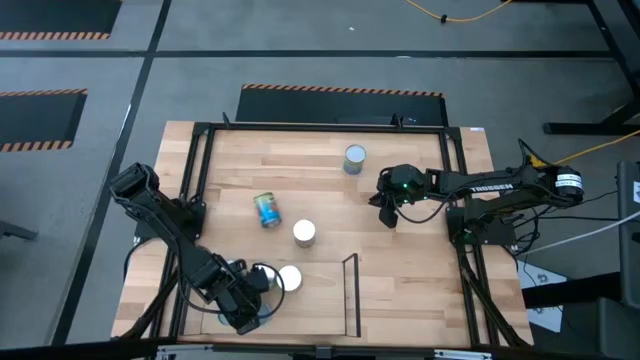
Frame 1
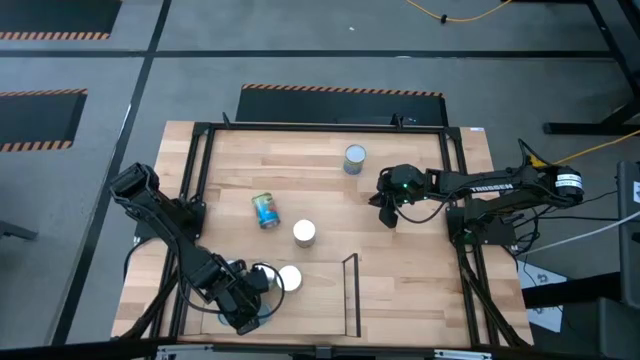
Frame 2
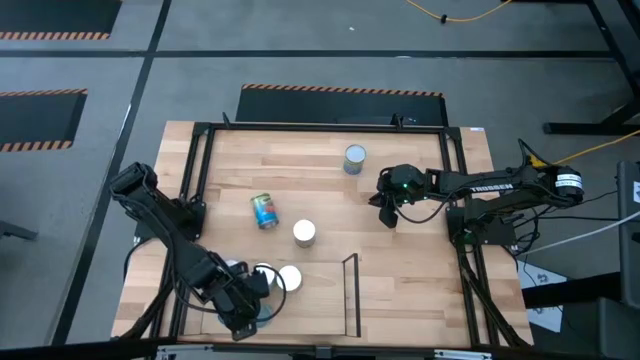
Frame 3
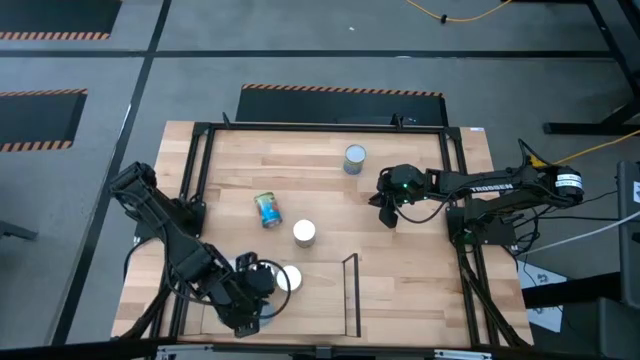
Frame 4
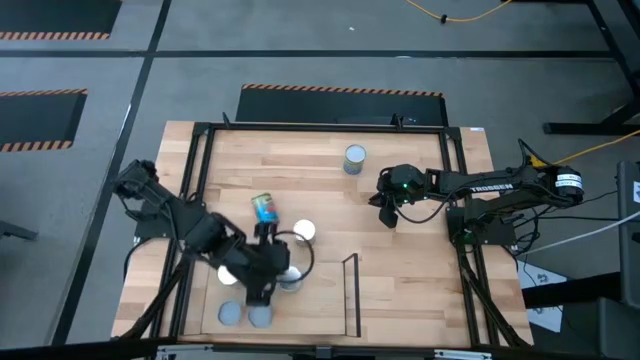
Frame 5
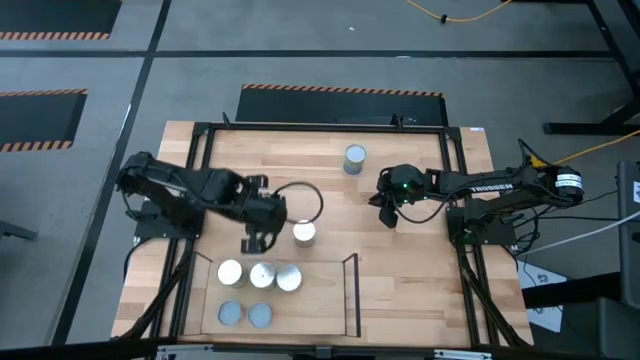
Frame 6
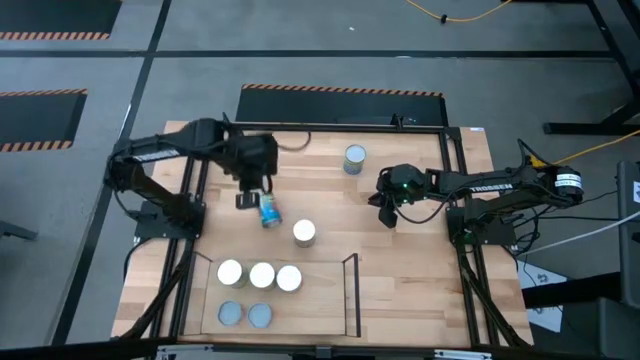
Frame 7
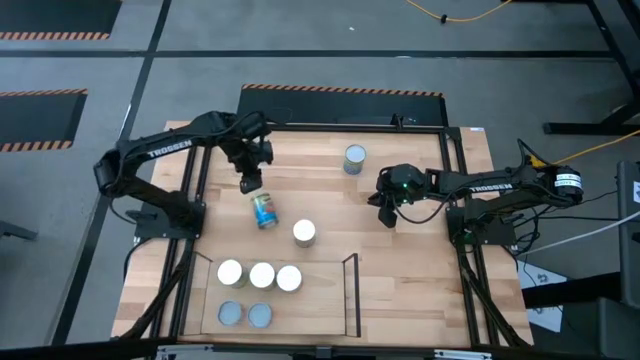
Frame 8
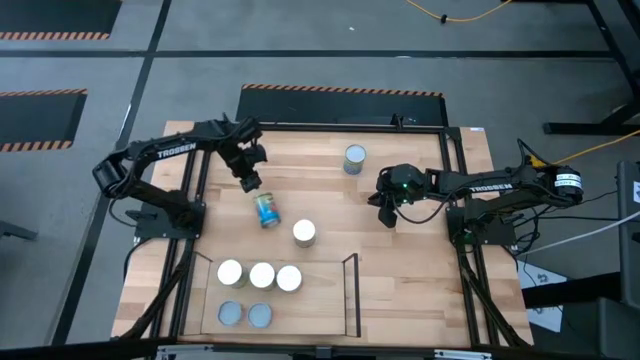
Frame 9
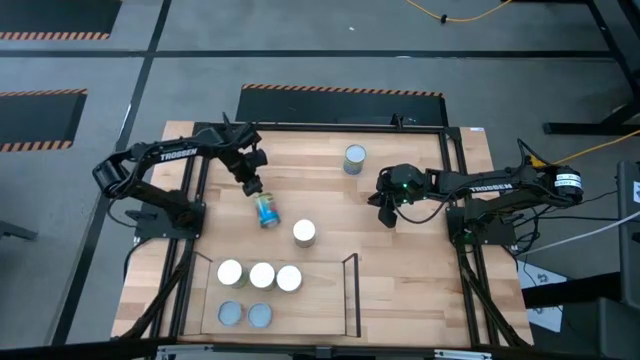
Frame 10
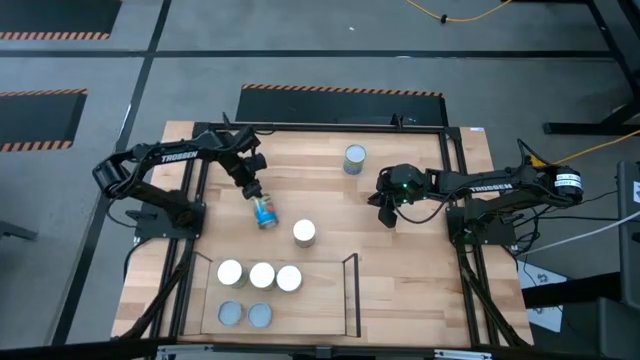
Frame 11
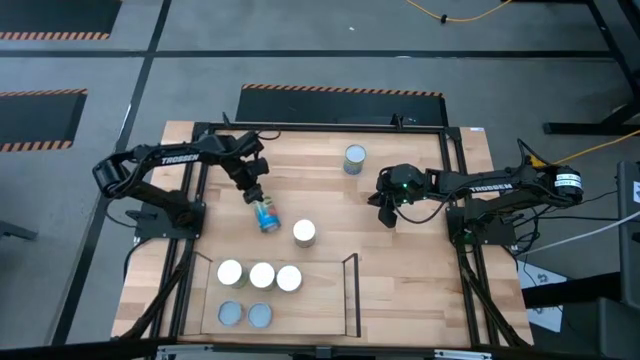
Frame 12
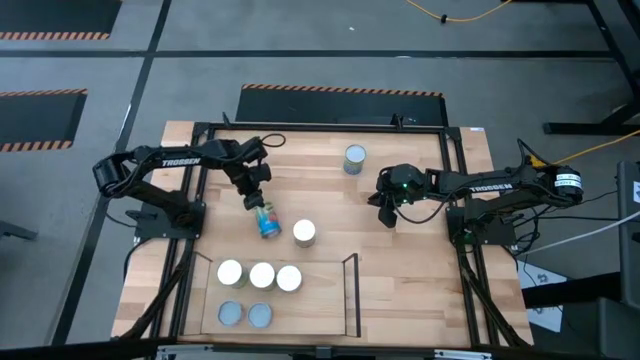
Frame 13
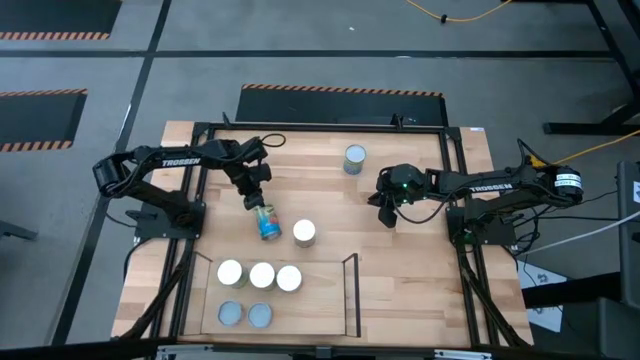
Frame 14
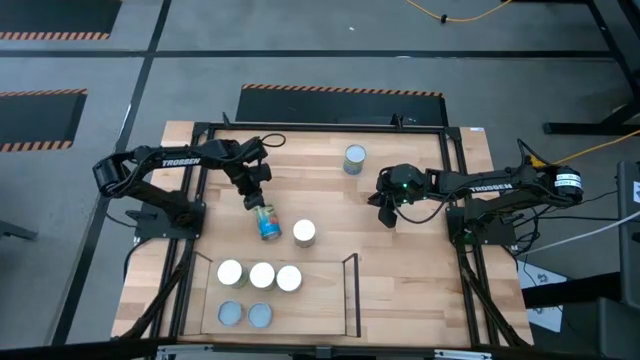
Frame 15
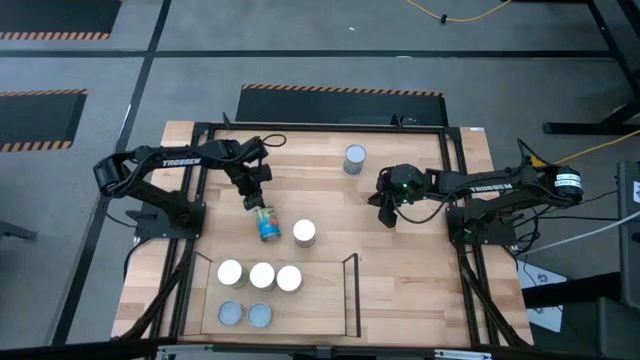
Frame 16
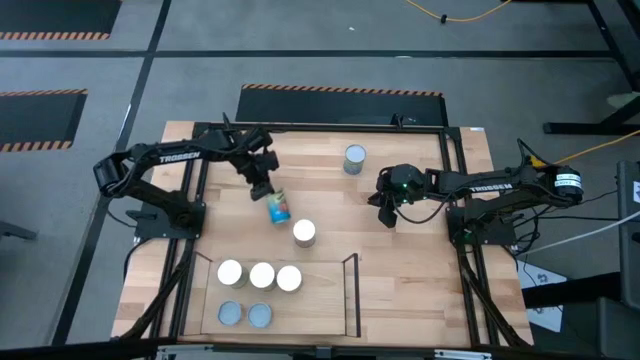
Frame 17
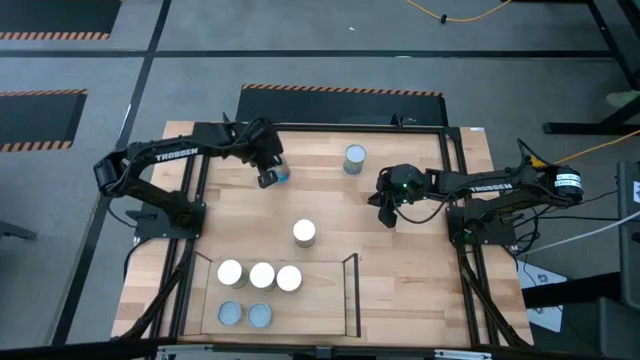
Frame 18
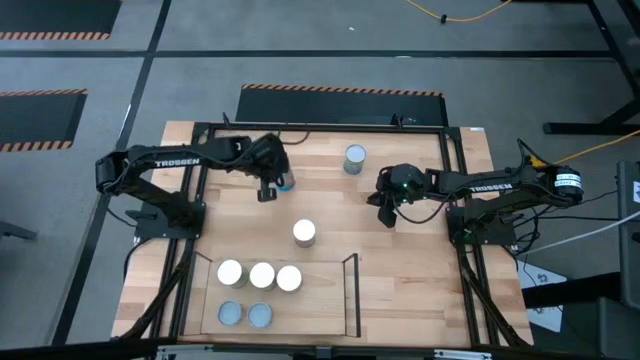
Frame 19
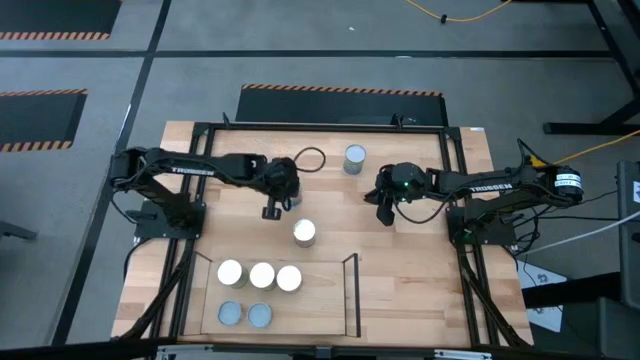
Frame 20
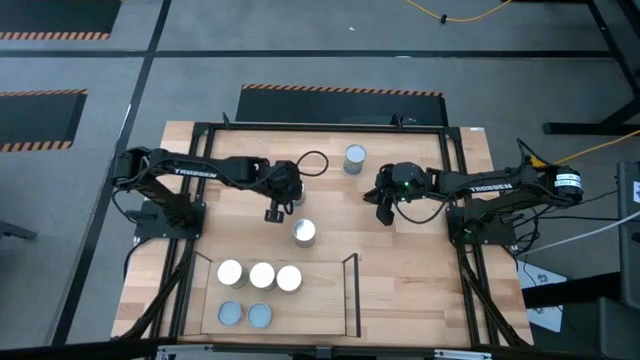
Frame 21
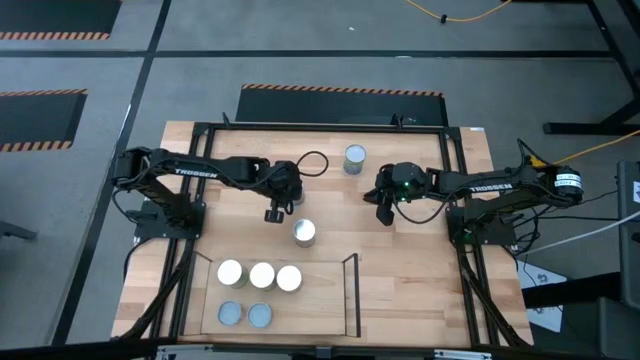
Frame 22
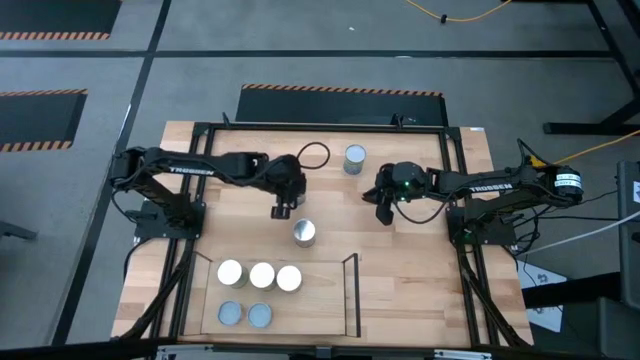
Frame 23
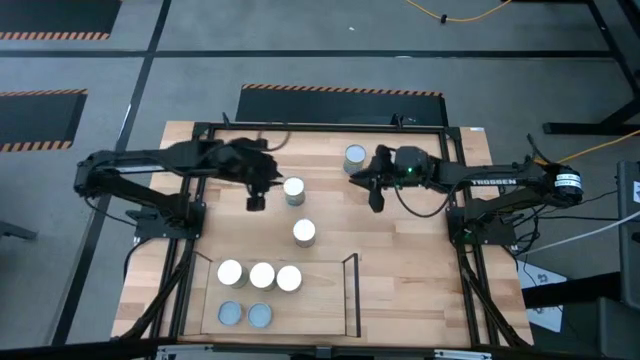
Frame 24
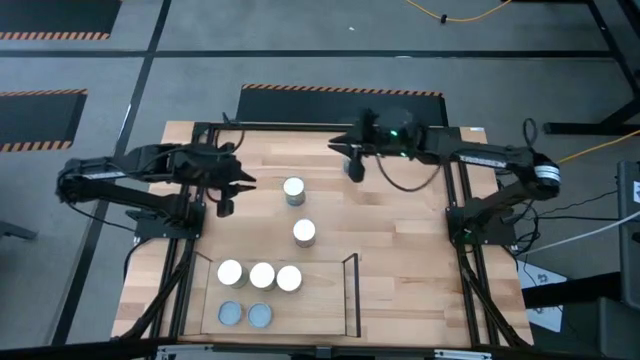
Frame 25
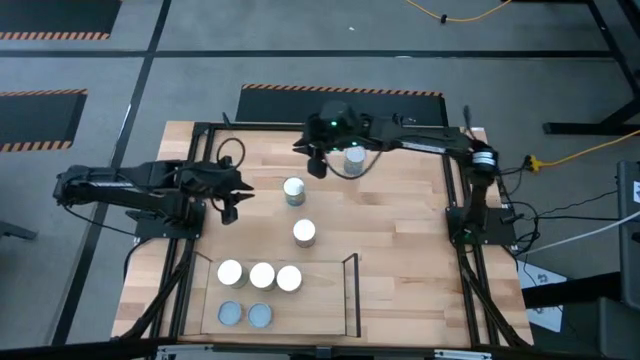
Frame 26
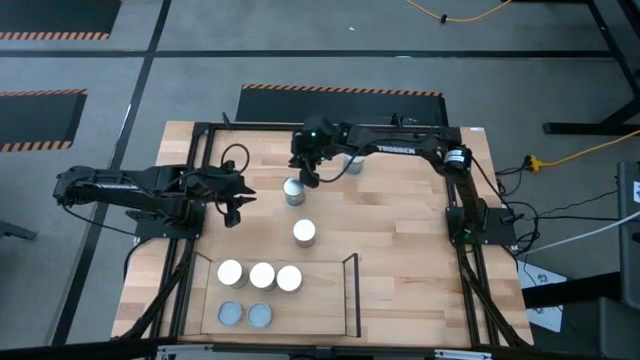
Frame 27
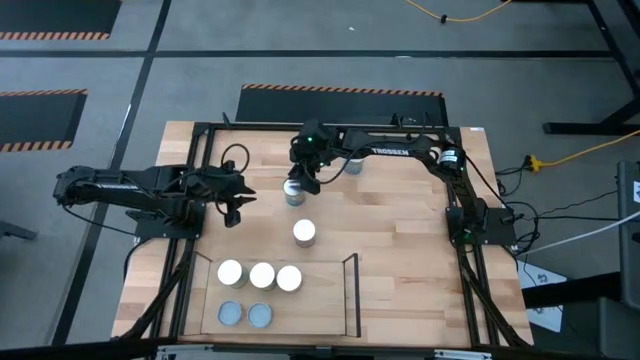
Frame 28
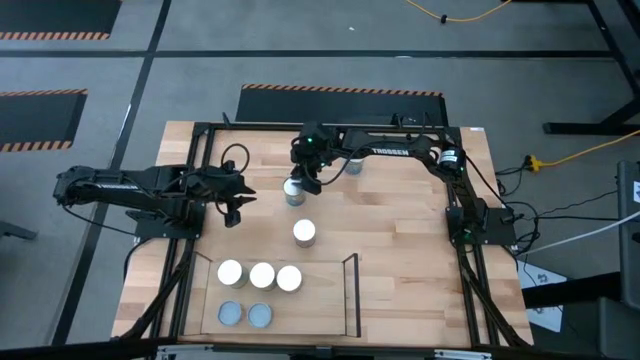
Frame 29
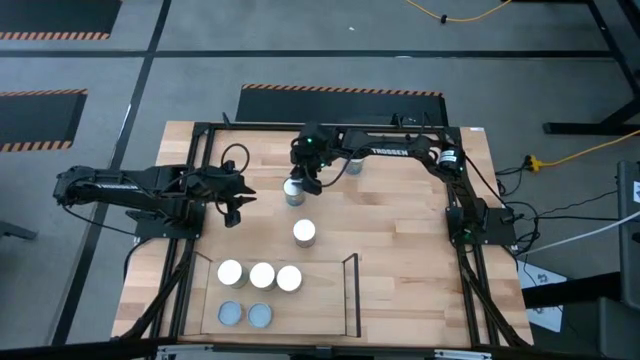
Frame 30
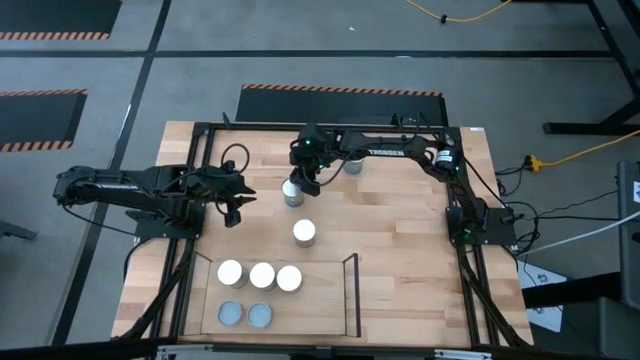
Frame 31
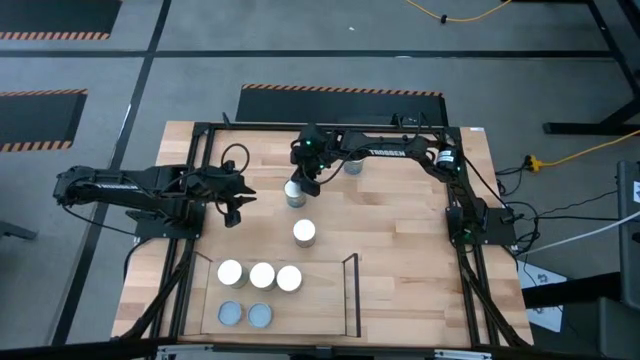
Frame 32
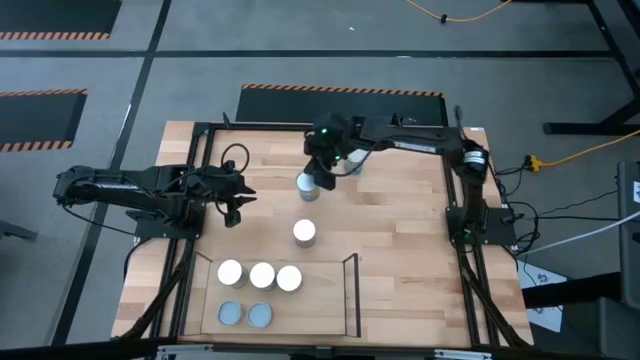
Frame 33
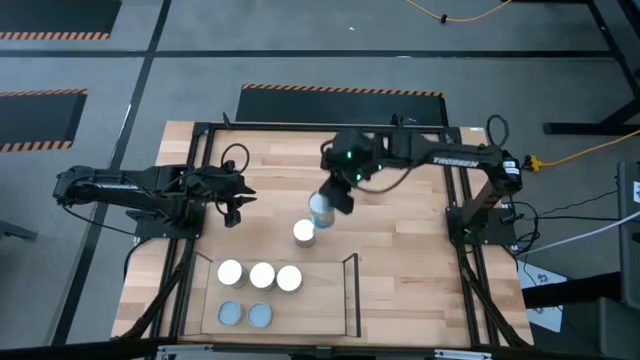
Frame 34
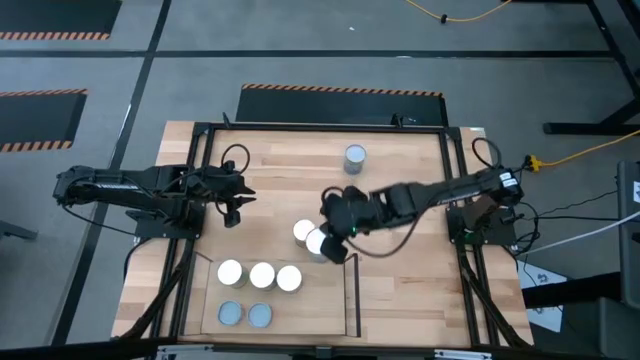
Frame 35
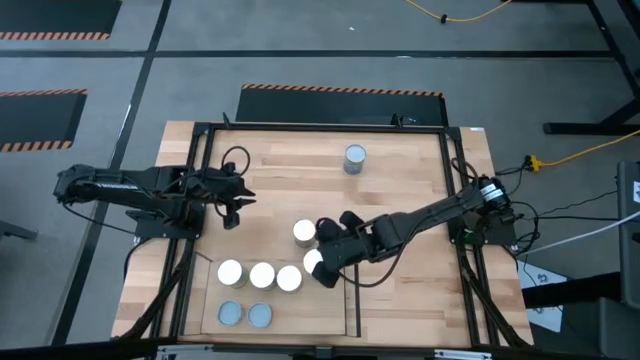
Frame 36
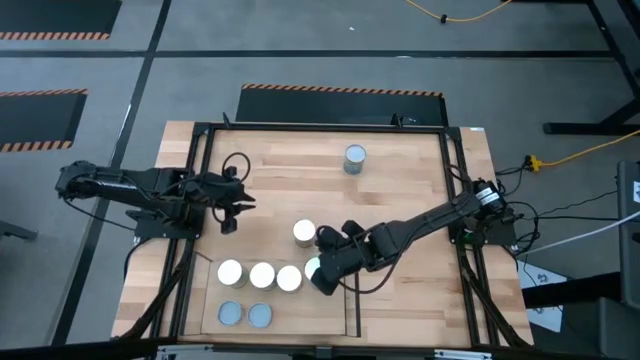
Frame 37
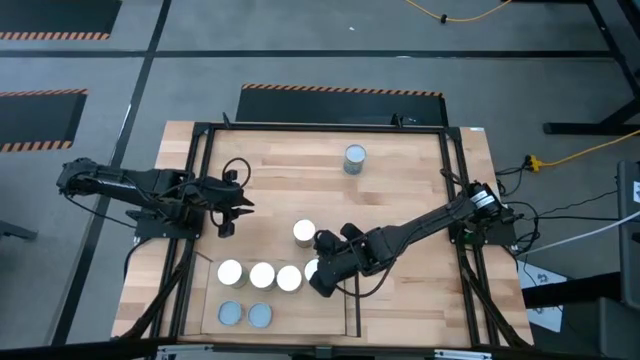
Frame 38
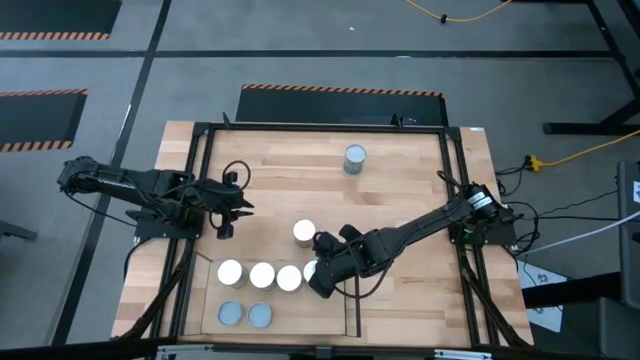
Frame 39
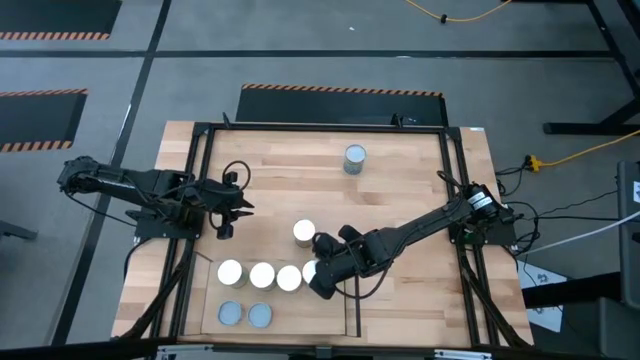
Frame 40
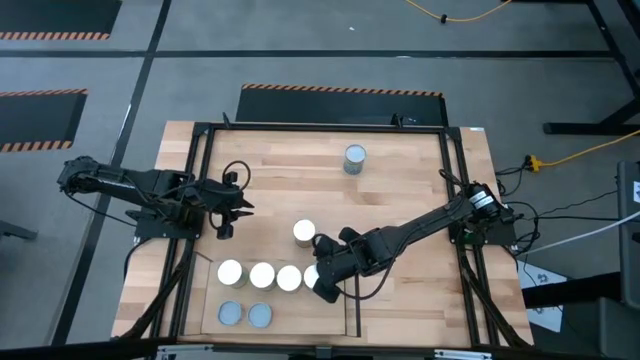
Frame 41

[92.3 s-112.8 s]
Task: Pick and place cans onto a shelf
Put the tomatoes on the shelf
